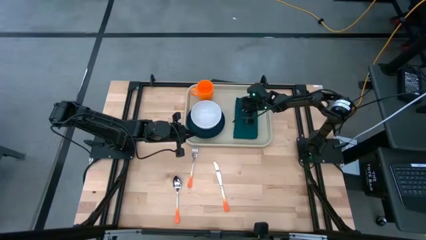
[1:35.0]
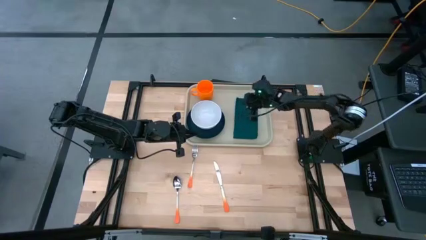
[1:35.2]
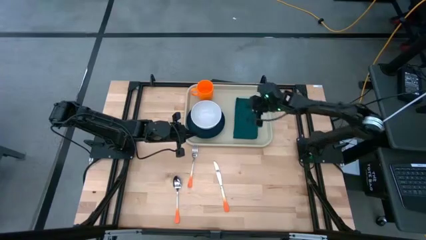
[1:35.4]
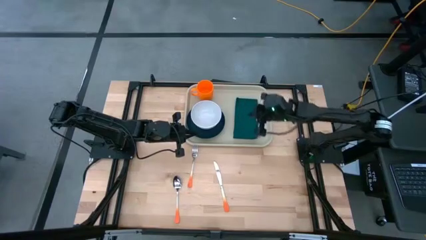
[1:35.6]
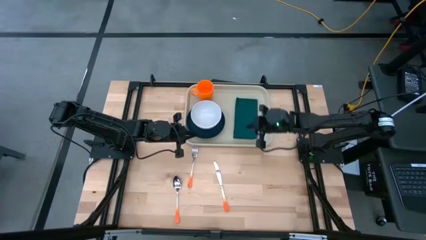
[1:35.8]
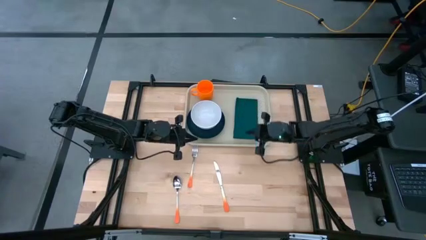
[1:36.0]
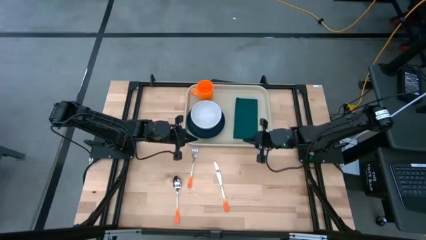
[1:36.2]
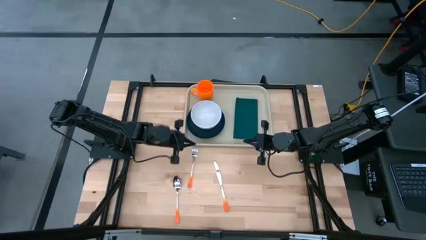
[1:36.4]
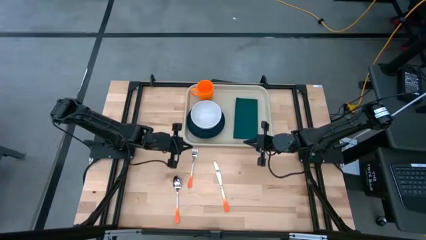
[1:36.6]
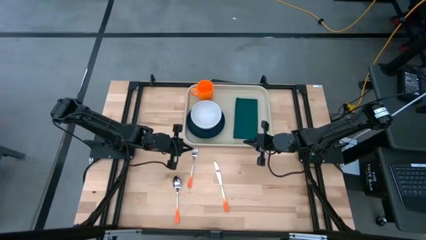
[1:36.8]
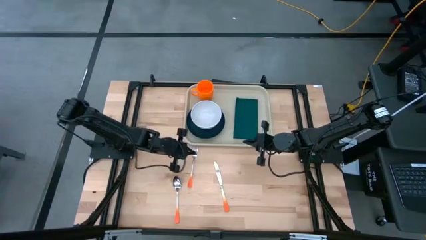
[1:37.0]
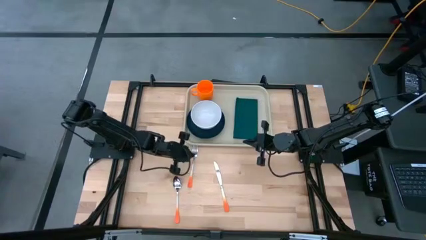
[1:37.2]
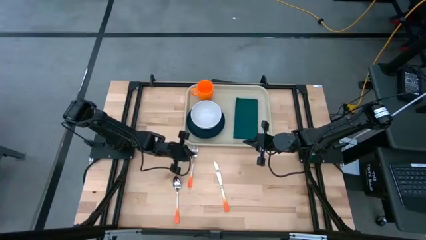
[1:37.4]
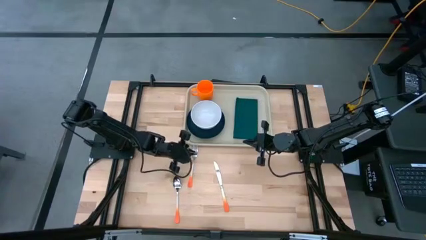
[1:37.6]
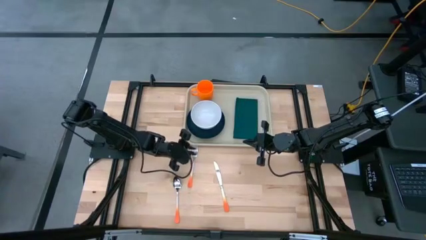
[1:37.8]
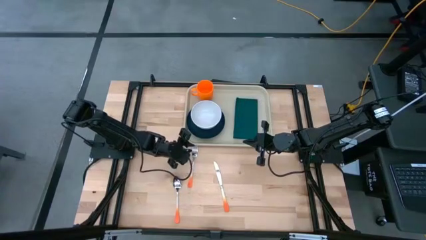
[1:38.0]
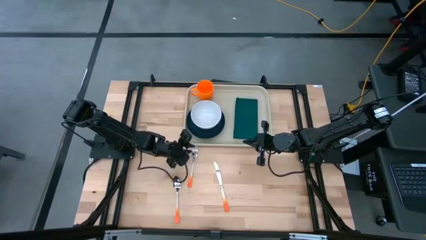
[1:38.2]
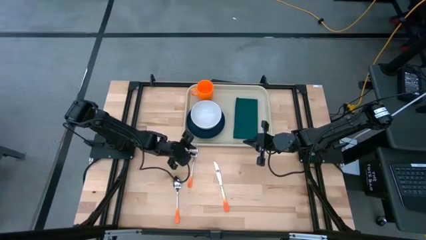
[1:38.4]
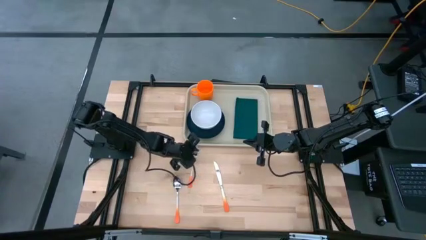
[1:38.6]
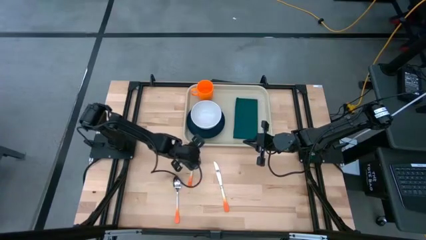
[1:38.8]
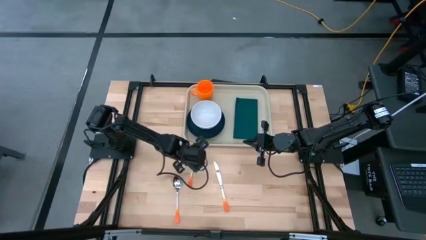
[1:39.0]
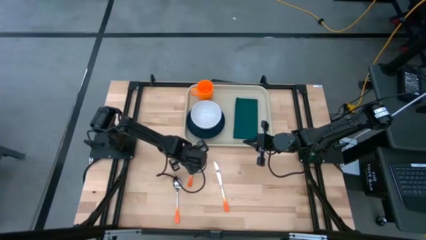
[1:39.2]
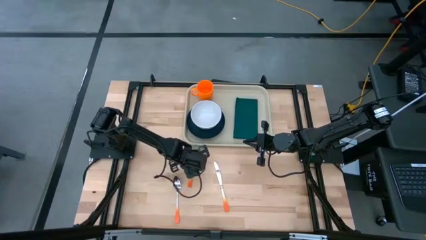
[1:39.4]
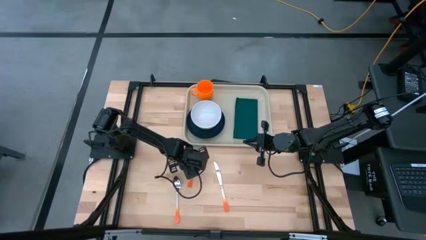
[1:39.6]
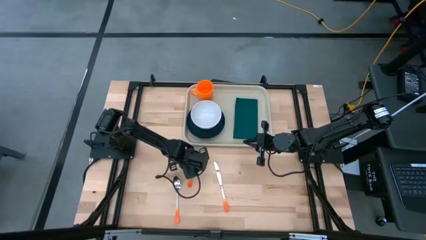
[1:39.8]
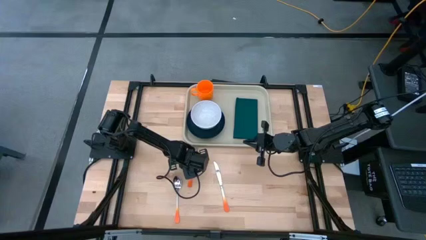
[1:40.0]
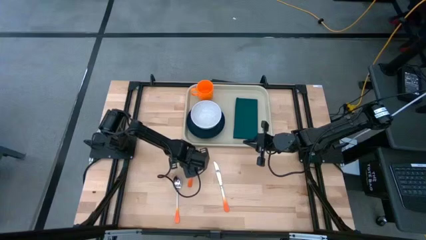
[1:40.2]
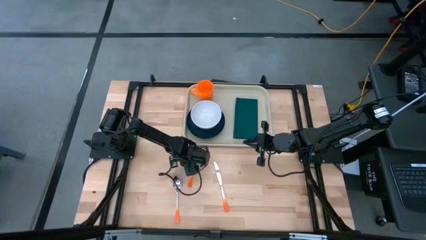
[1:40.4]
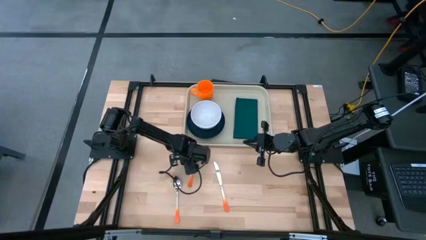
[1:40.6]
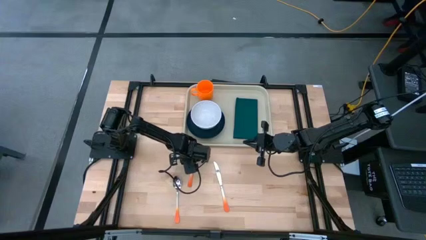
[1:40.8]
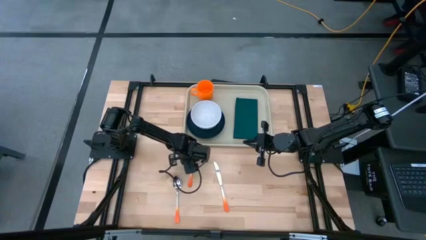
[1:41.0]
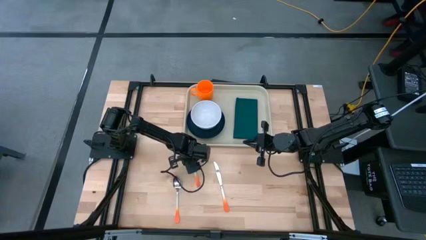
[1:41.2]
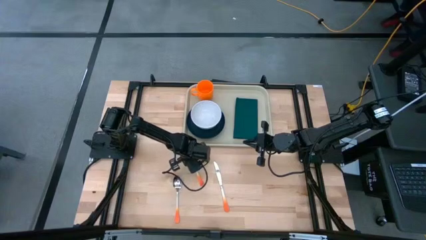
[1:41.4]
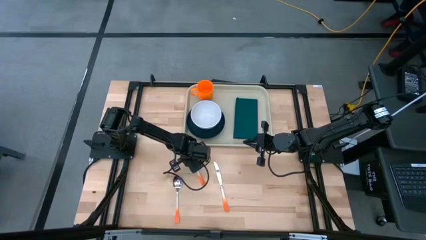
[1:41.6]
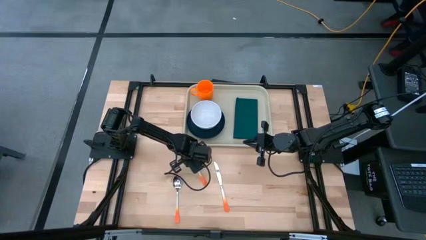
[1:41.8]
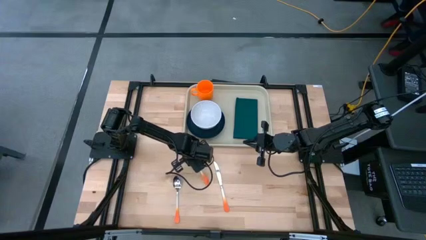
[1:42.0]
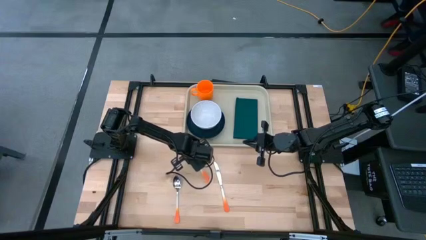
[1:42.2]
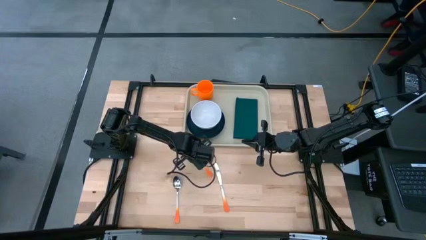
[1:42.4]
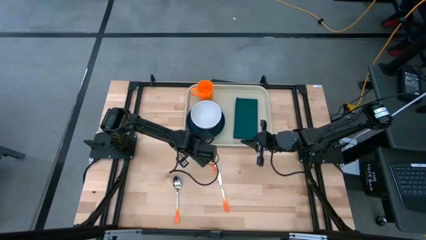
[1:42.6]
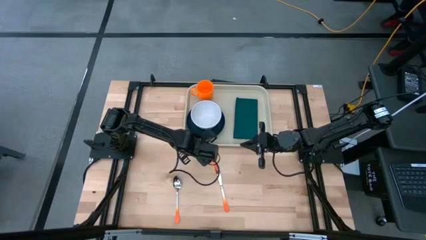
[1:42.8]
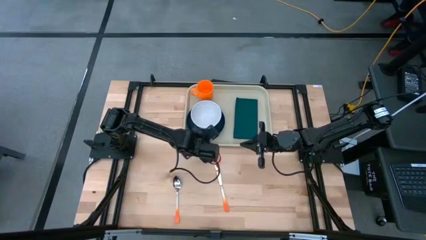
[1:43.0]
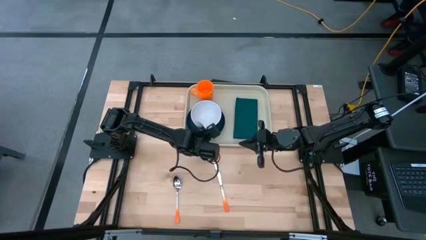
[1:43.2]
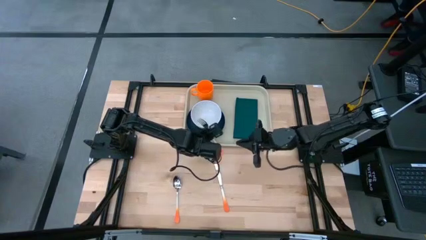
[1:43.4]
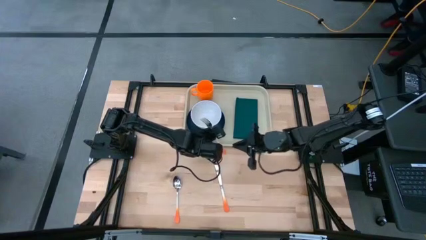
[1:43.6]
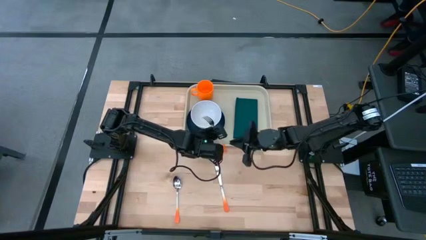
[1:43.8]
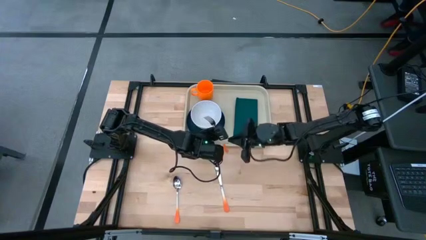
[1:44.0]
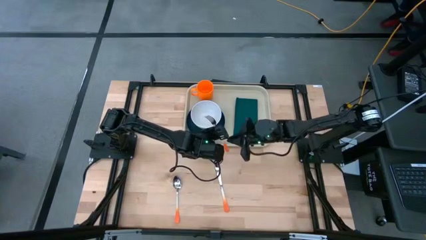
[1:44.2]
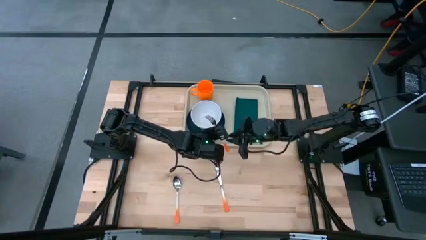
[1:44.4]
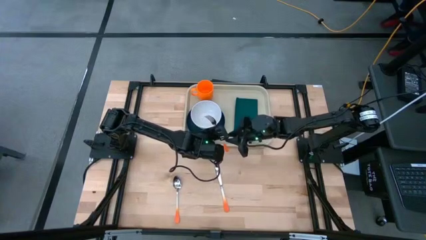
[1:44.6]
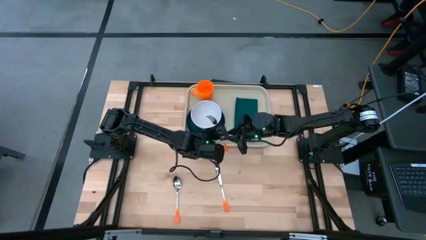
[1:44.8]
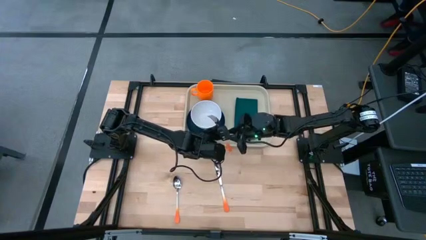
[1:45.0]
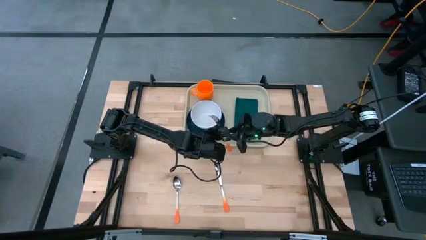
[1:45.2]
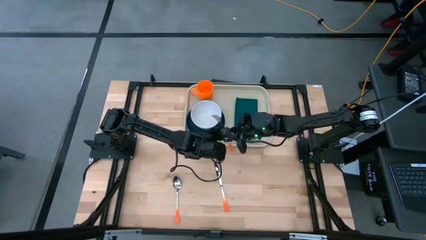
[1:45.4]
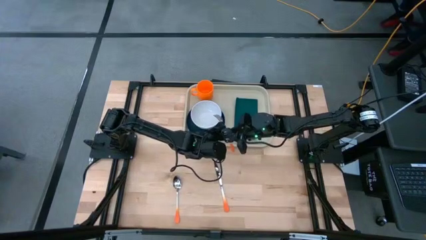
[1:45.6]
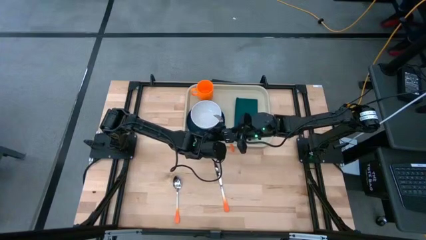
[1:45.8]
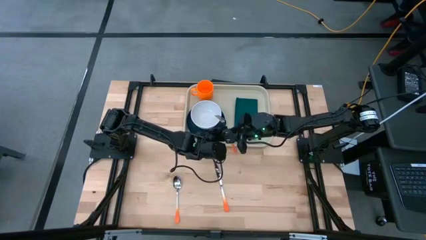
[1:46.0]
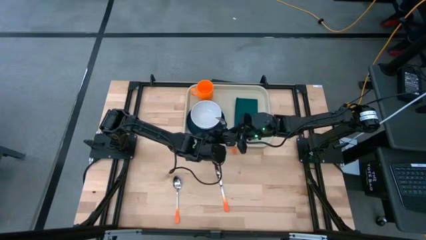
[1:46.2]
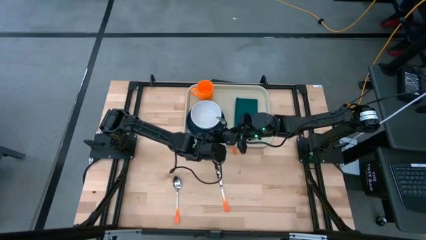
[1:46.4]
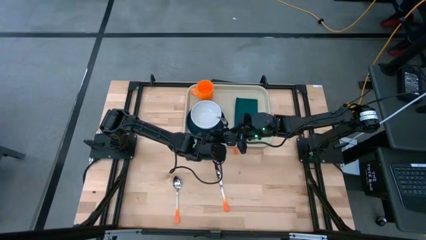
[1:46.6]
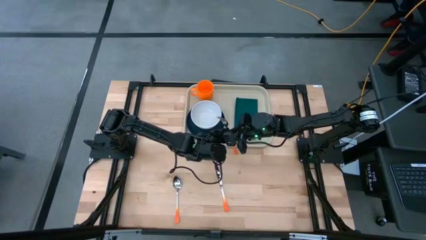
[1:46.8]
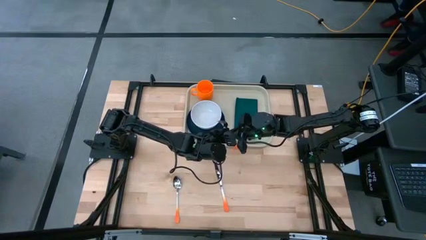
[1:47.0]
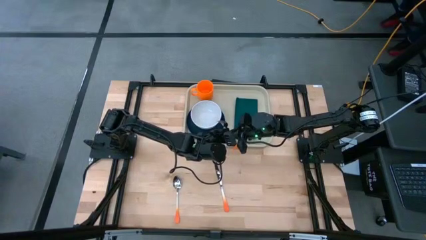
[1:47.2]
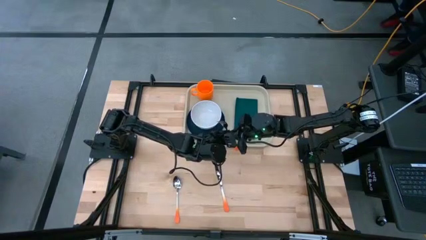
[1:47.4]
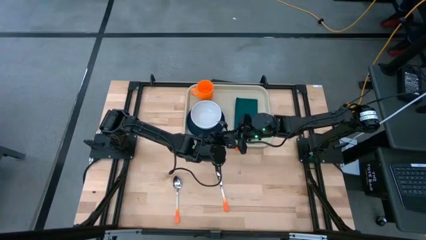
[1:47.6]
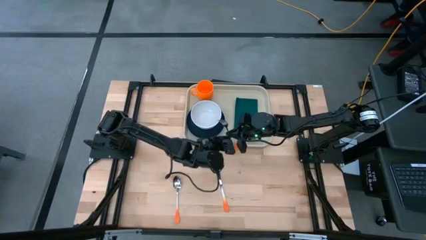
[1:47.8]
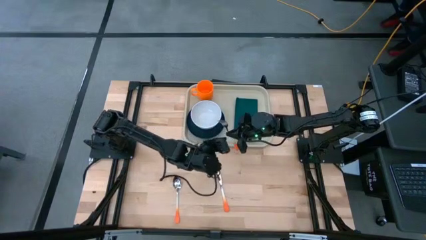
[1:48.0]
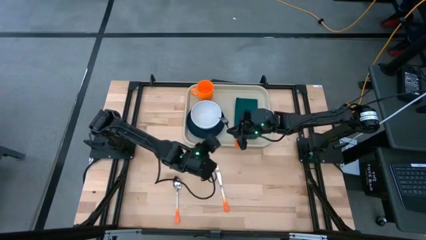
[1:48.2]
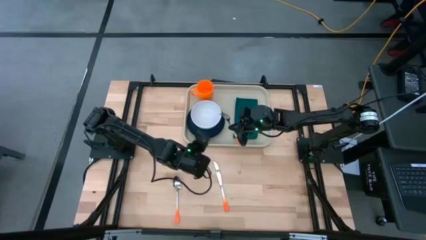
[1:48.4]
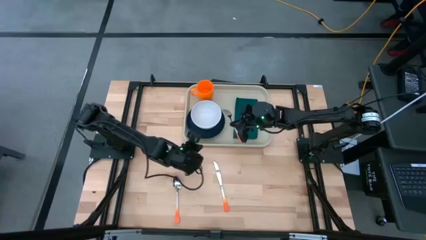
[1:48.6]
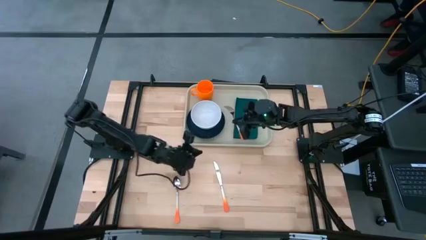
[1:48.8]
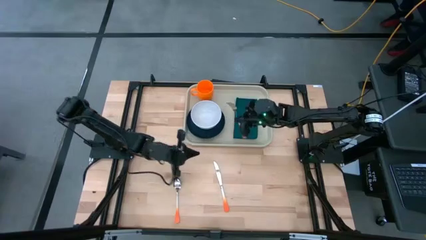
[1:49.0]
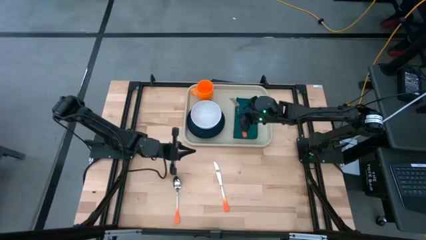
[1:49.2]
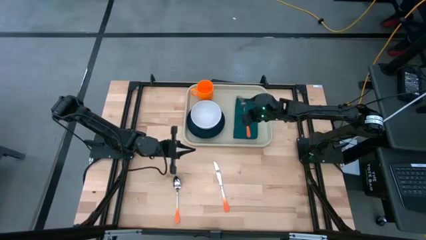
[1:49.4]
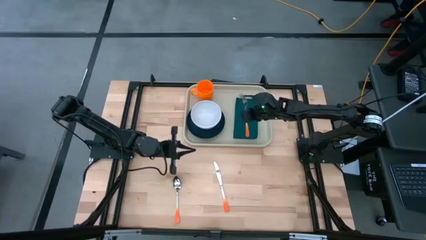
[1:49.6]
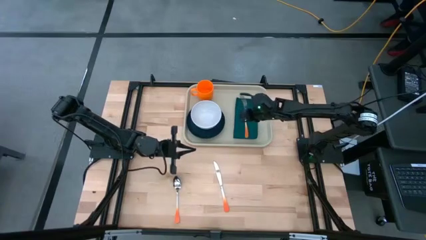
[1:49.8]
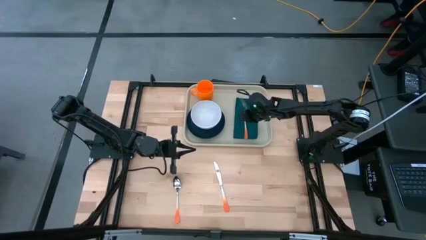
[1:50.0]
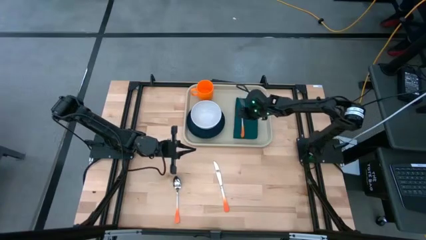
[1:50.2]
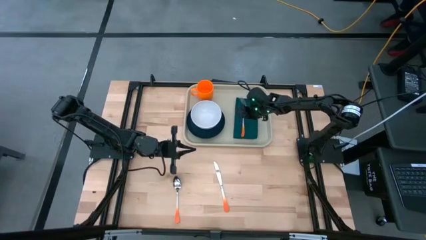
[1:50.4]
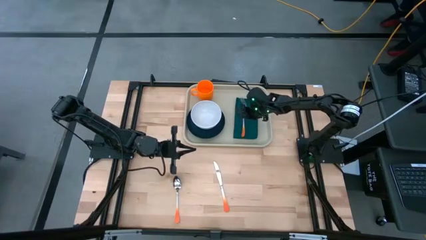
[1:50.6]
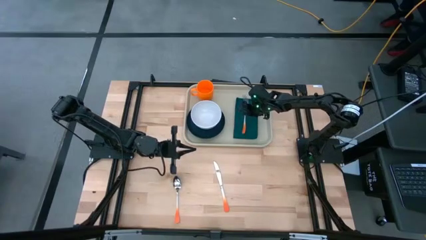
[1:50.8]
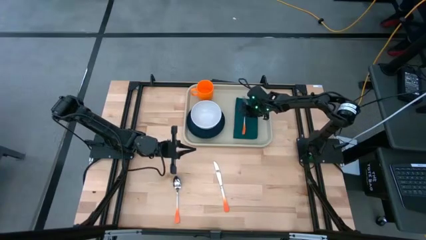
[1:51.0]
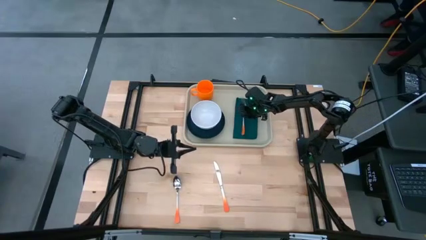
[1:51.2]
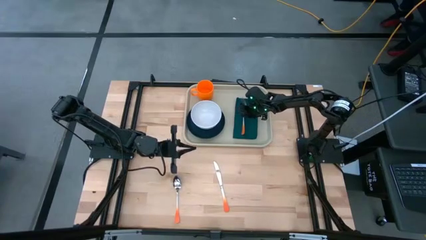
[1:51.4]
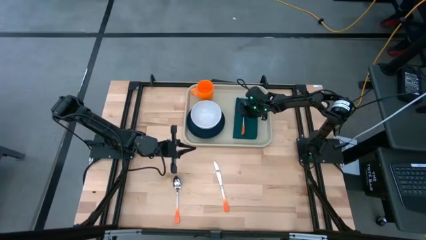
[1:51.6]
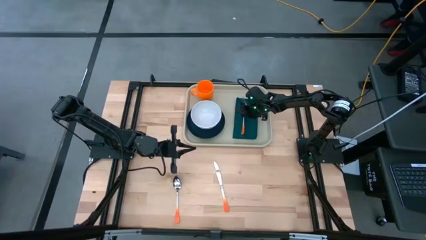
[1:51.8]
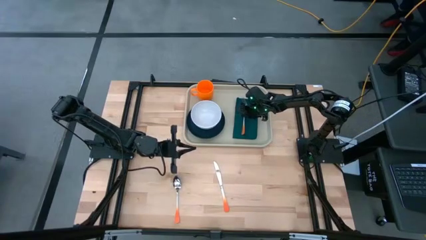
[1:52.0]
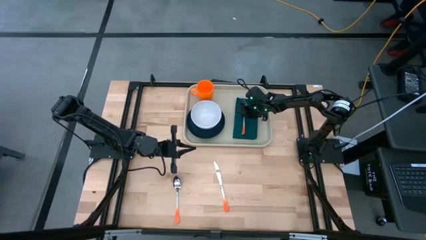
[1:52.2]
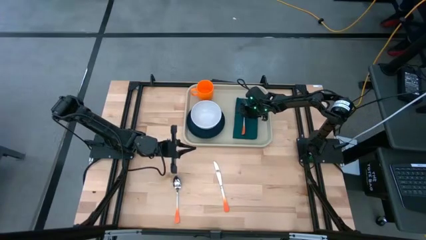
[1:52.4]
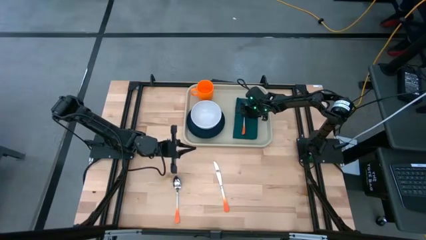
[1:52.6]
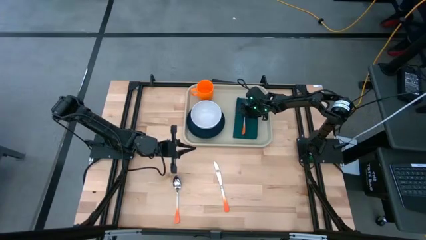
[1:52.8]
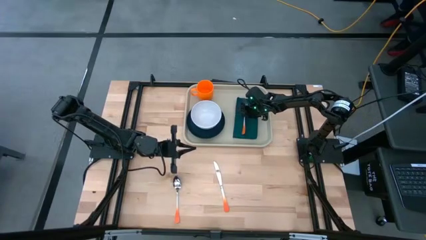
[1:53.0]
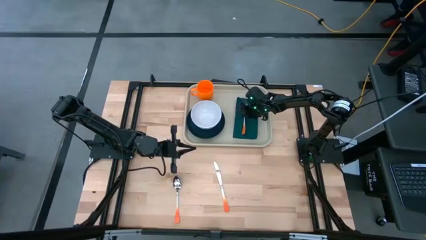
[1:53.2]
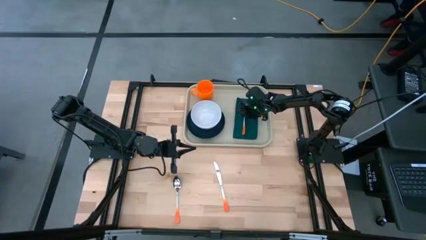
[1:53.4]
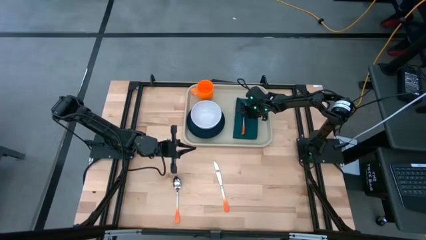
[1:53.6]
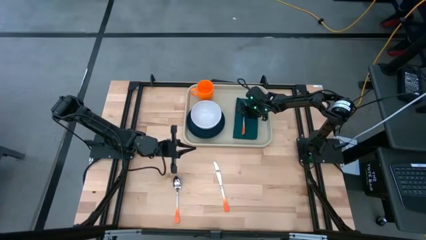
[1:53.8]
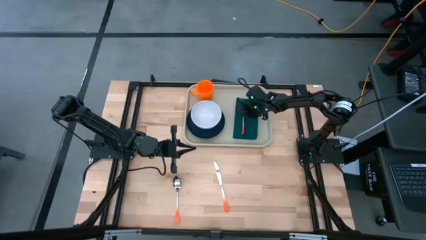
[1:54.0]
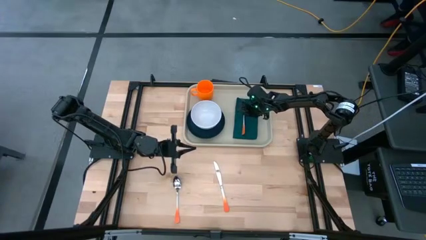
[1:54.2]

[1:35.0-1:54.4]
Task: Set up tray
Put the orange fork on top of the napkin to the right of the green plate on the gray serving tray
